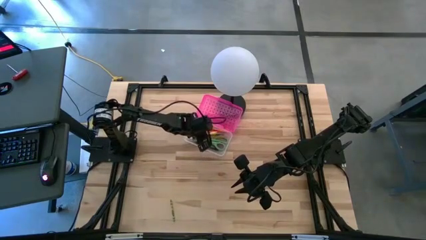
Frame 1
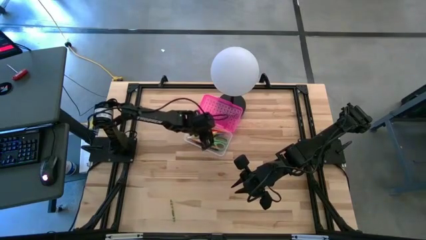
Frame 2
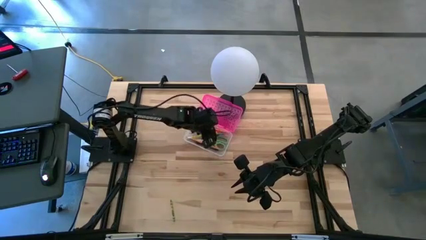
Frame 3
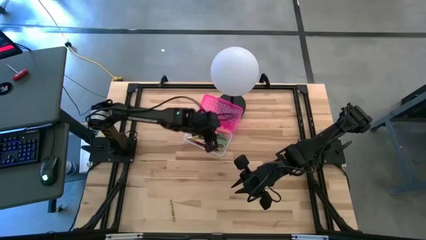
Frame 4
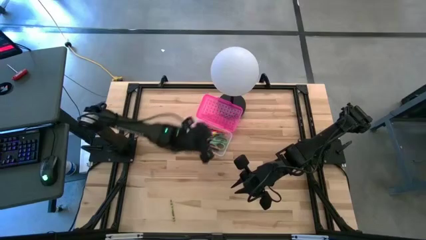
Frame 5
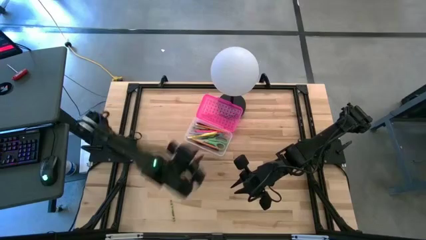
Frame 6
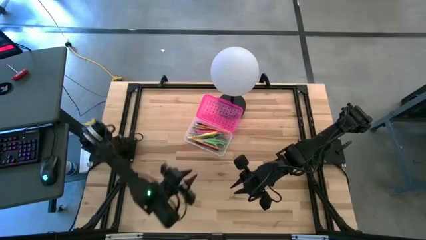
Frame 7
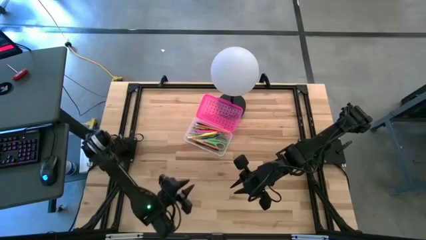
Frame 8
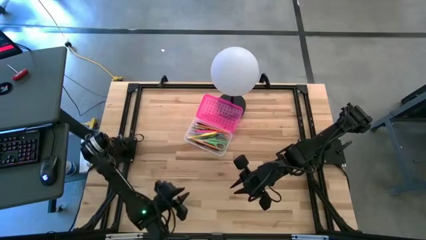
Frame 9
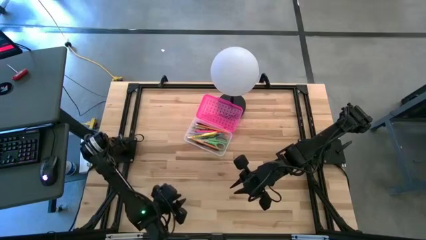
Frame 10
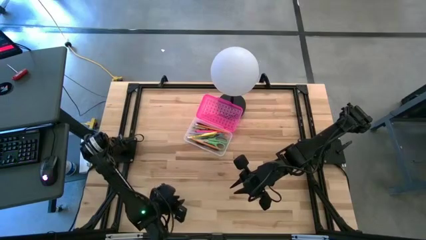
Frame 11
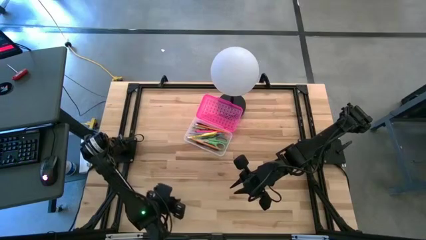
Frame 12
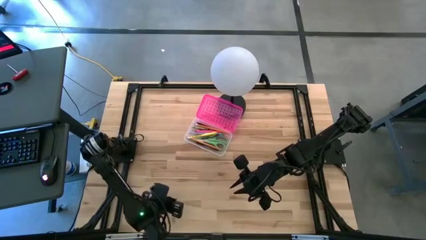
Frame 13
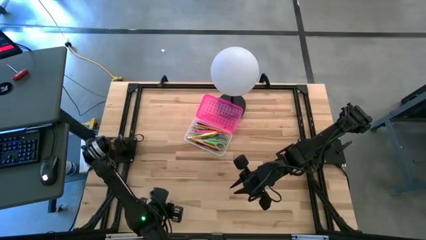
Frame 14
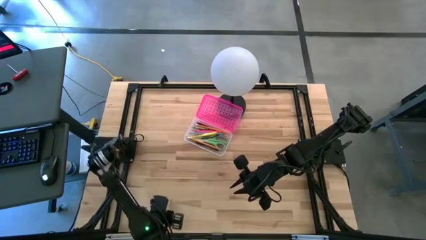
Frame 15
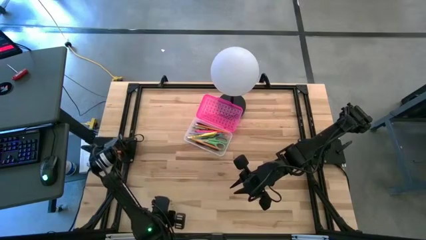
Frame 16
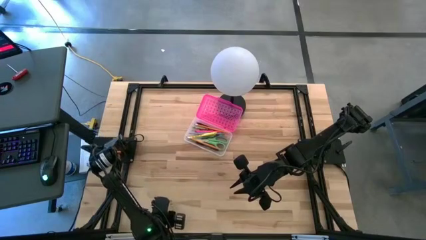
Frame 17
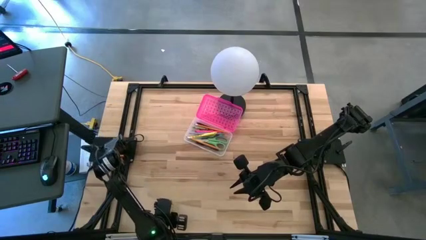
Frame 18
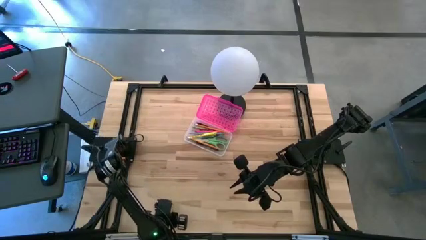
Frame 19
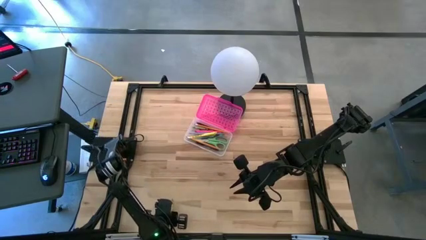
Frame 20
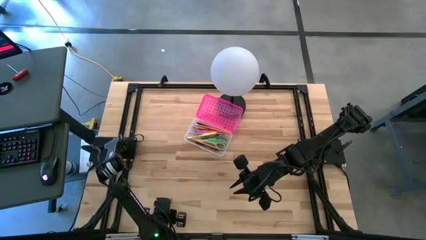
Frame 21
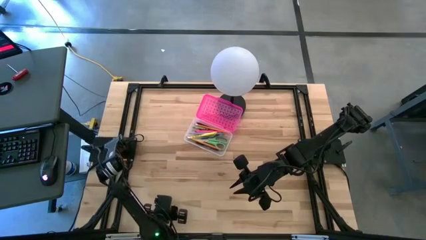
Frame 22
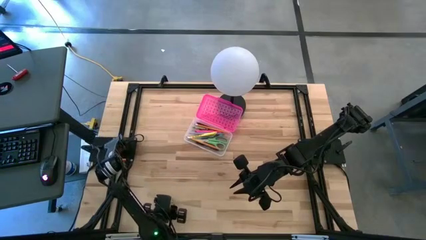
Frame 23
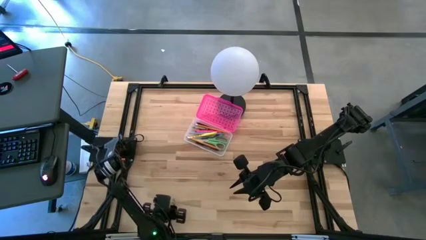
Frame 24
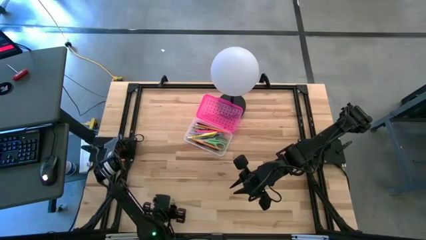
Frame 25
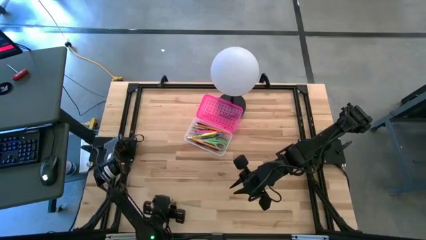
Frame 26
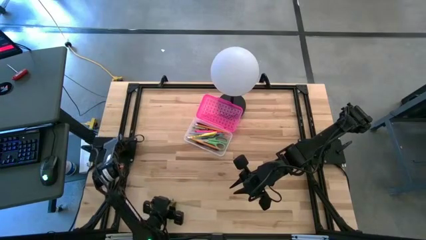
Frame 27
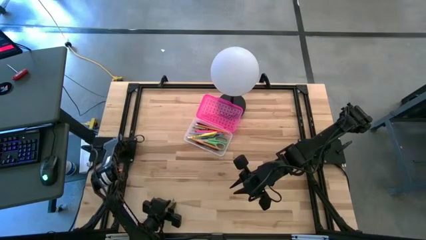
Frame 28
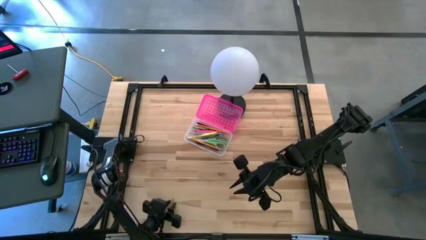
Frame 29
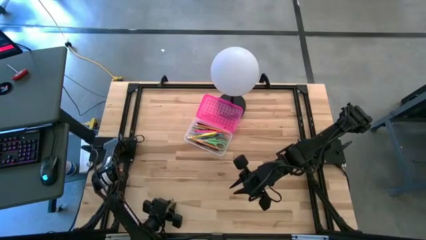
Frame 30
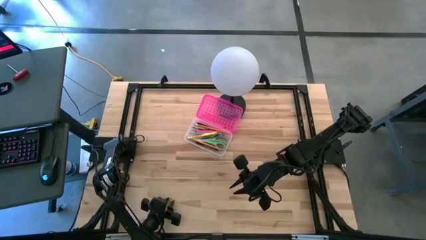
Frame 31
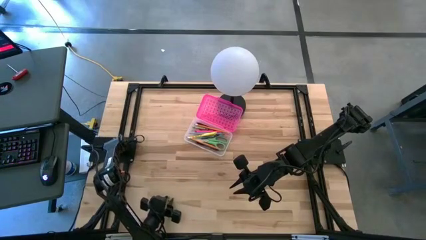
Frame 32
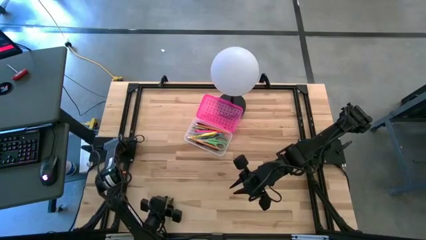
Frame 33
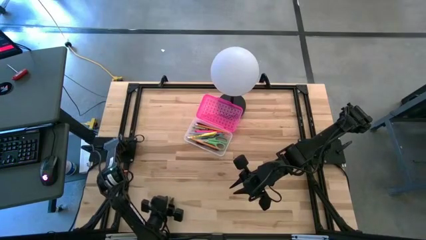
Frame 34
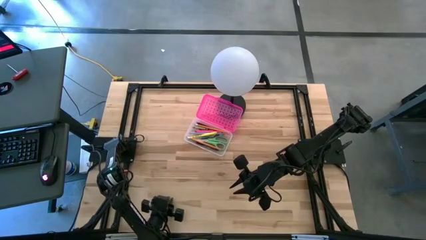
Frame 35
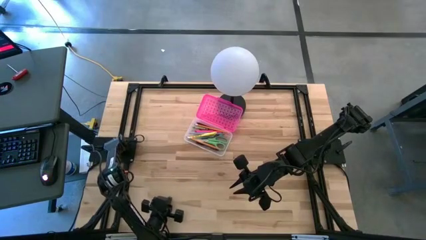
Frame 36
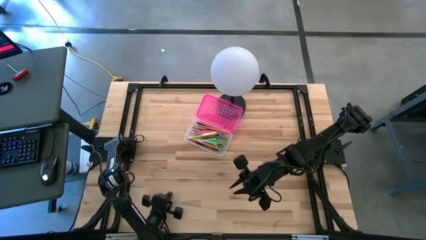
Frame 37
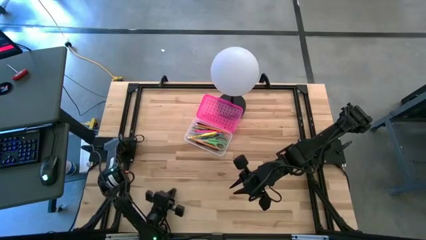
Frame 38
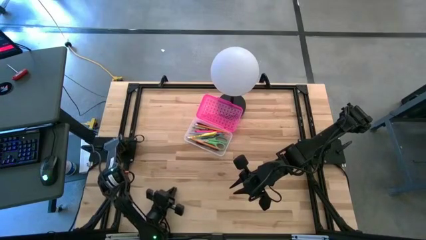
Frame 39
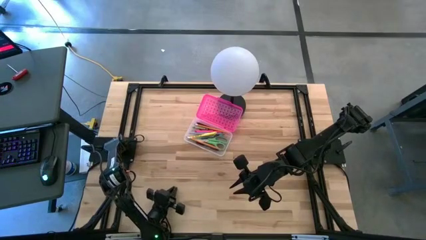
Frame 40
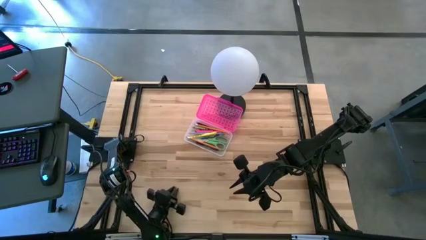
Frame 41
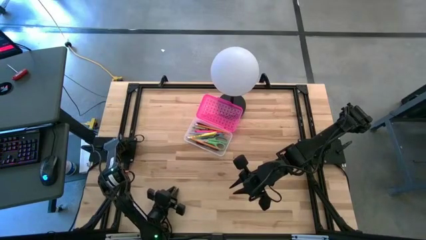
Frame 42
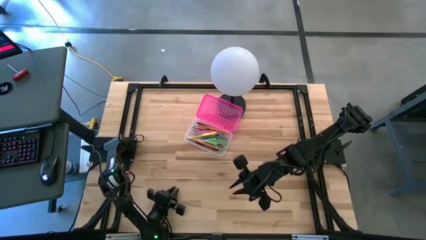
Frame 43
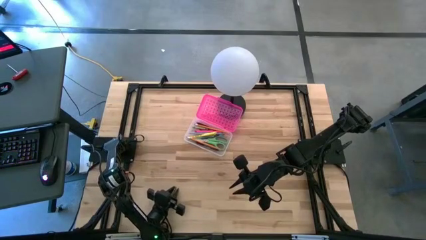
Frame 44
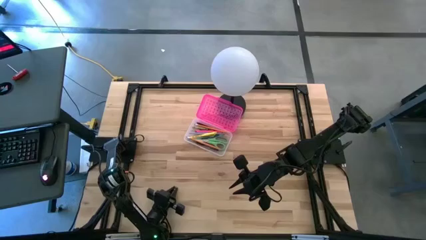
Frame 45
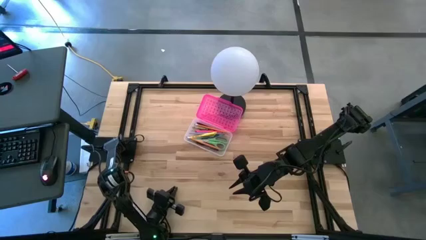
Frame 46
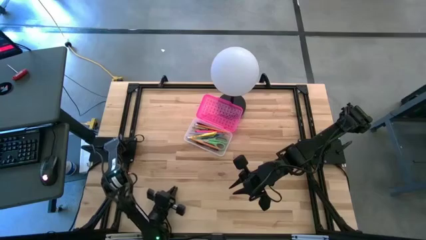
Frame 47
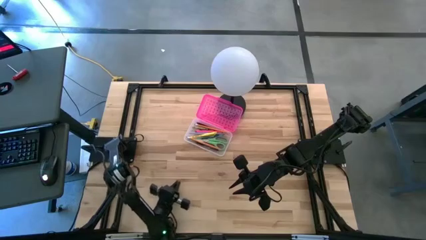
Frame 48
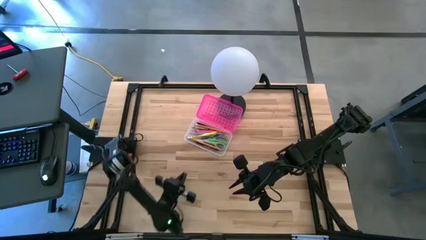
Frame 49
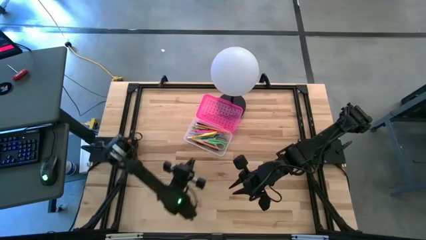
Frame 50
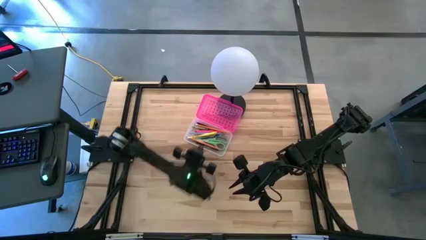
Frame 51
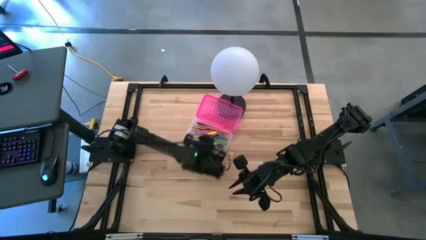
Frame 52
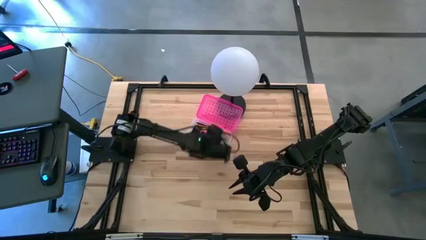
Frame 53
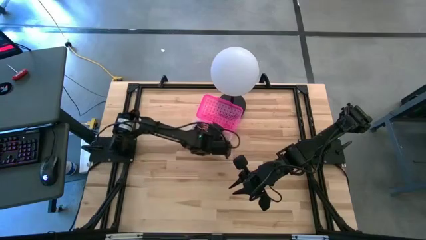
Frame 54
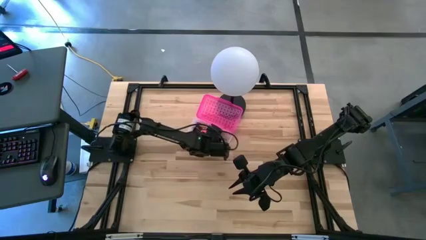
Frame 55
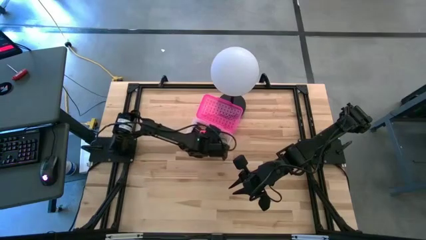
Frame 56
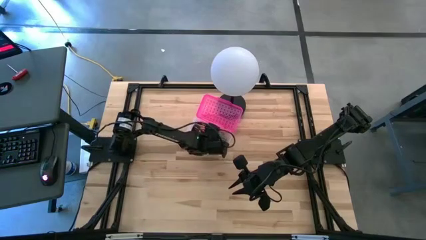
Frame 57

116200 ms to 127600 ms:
Task: Pick & place school supplies into a supply box
Put the green crayon into the pink supply box

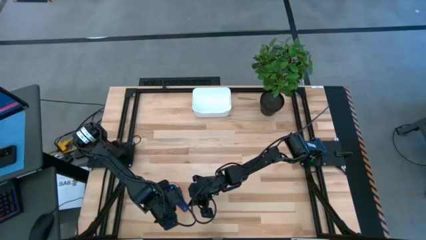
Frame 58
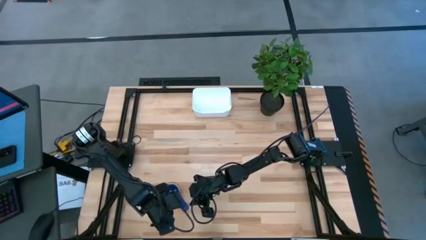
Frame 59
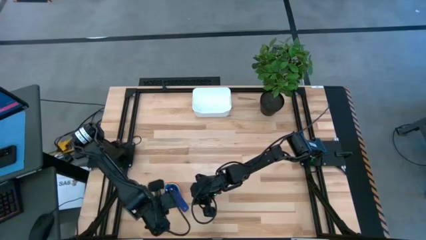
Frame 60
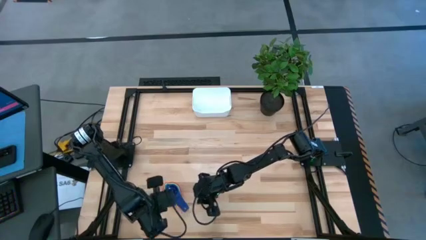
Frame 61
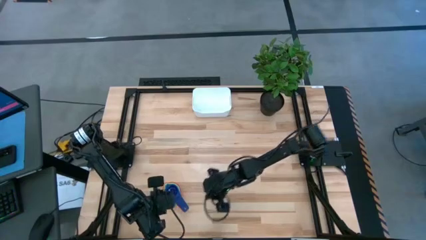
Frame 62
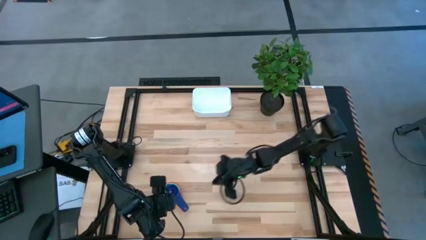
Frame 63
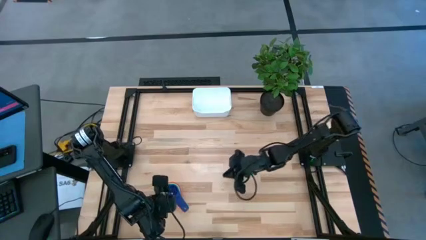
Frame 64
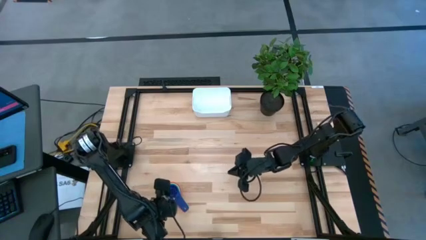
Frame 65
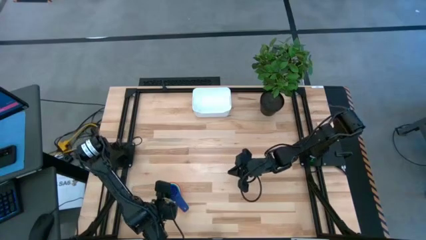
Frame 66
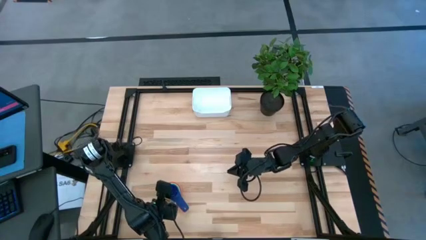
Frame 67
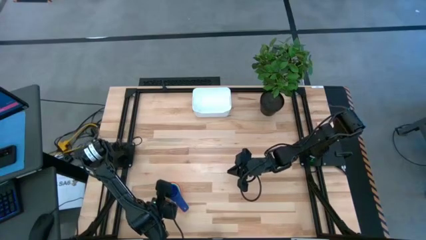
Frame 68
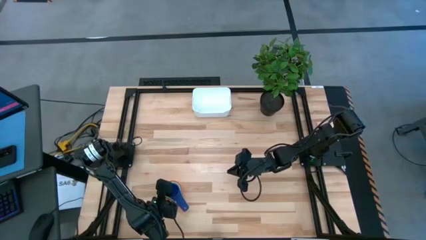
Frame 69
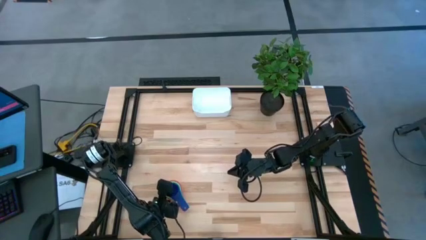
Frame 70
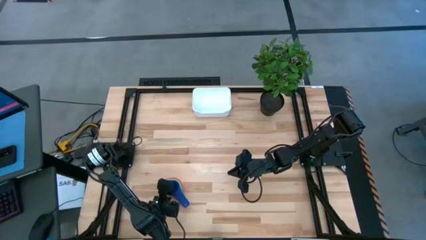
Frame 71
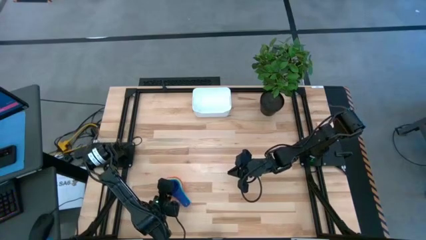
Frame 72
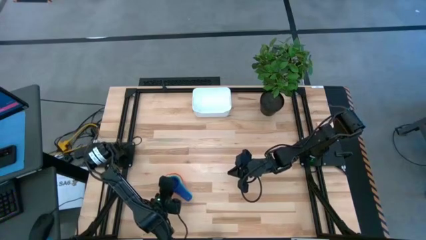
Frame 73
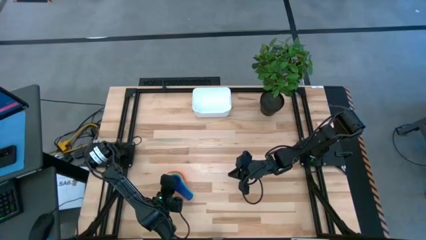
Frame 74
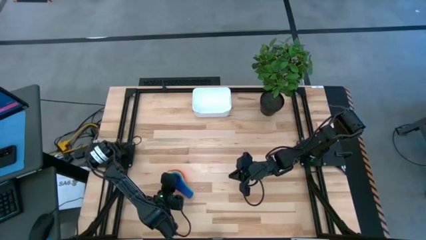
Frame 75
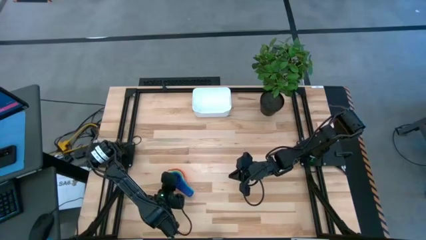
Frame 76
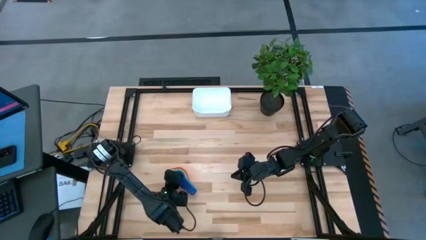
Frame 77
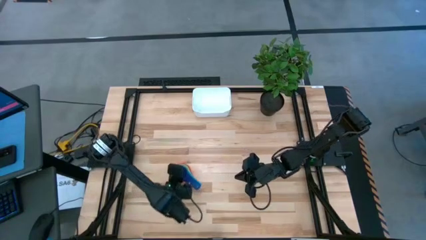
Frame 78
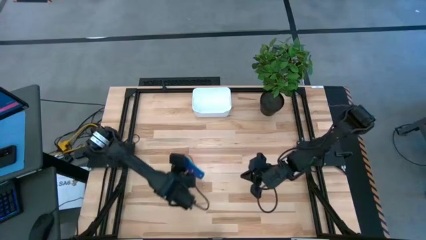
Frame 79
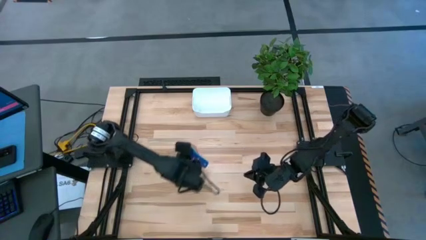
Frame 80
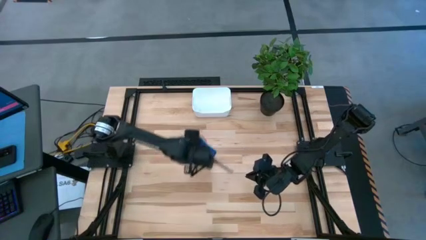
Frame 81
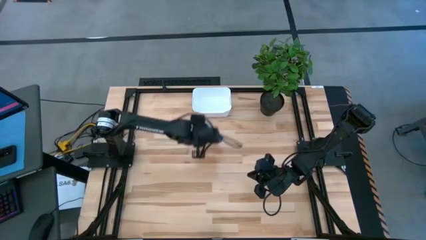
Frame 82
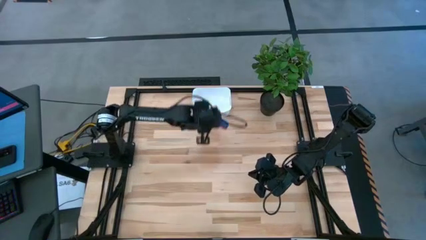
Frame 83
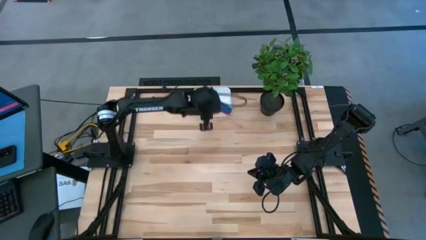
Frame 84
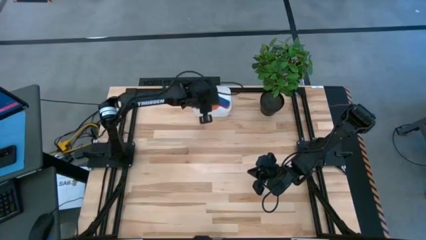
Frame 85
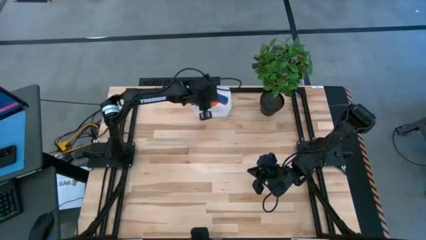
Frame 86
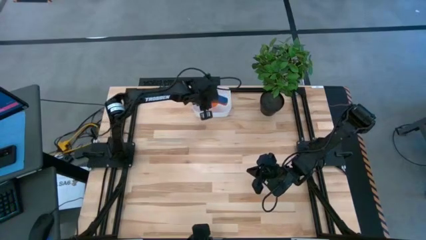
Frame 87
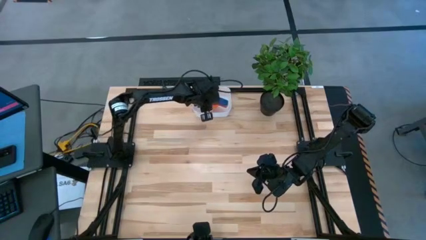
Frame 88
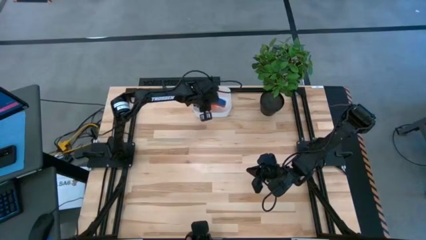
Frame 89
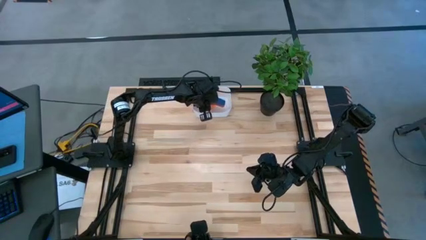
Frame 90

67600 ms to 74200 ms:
Task: Nest measuring cups in basket
Put the stacked measuring cups into the white bin
